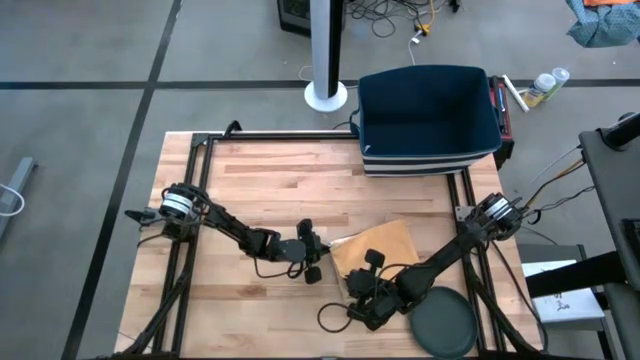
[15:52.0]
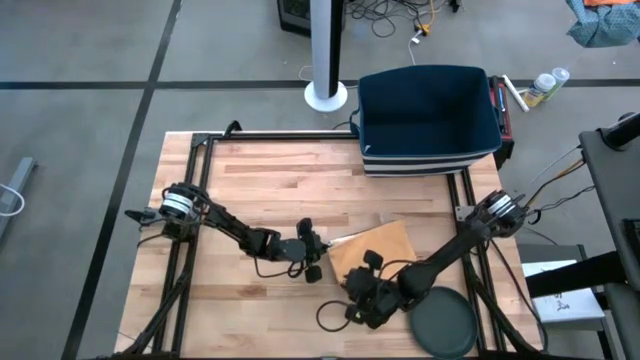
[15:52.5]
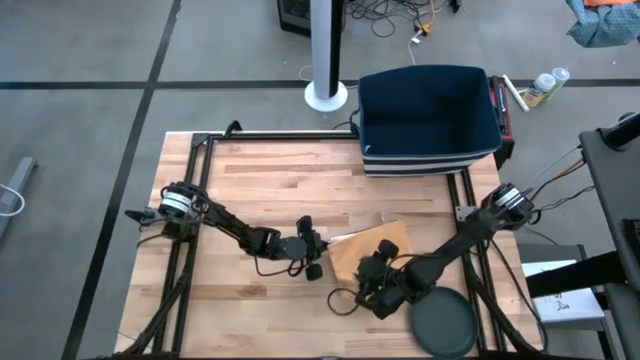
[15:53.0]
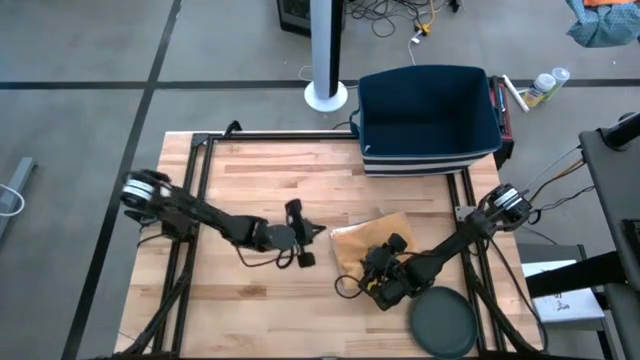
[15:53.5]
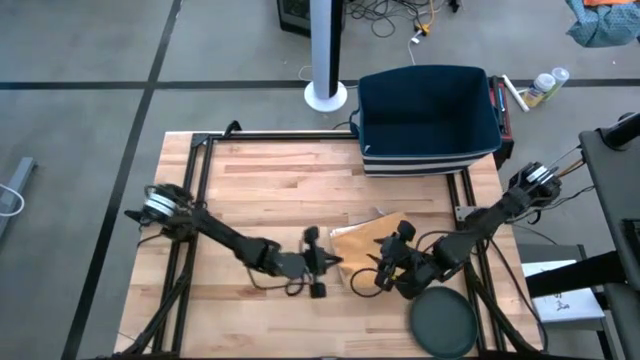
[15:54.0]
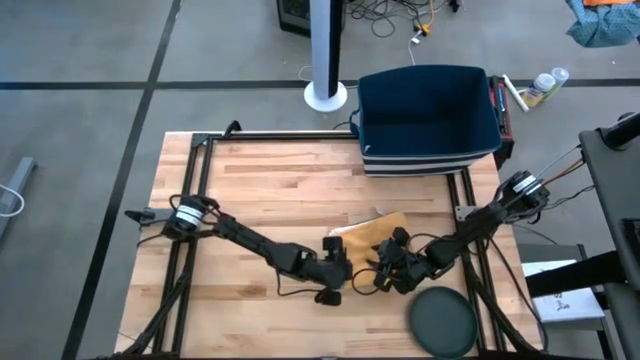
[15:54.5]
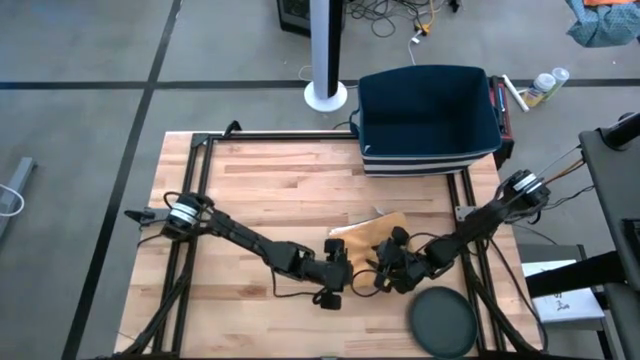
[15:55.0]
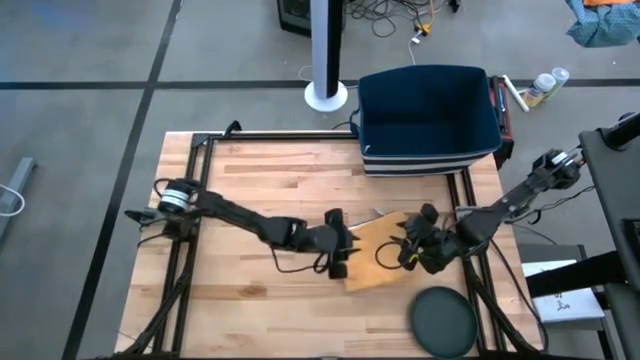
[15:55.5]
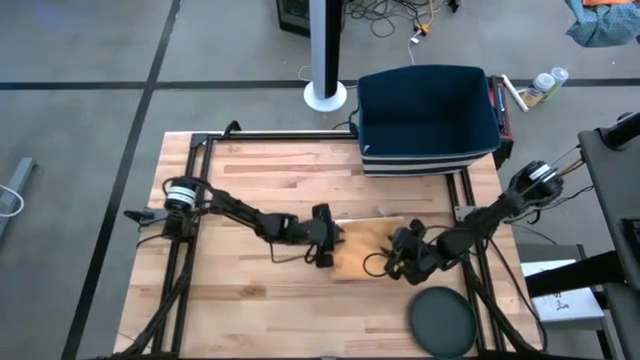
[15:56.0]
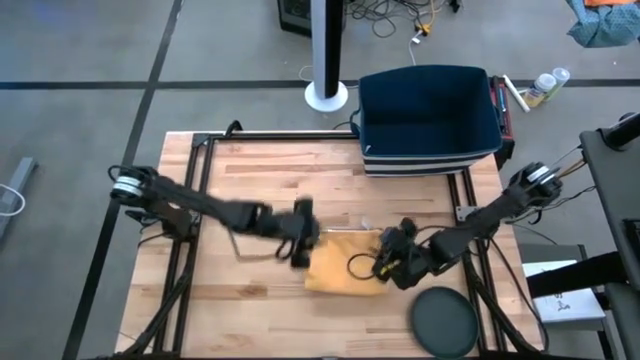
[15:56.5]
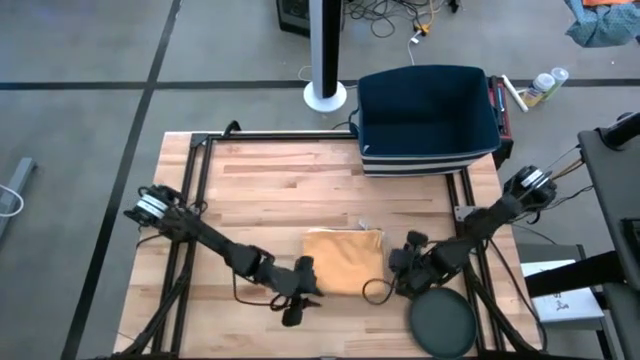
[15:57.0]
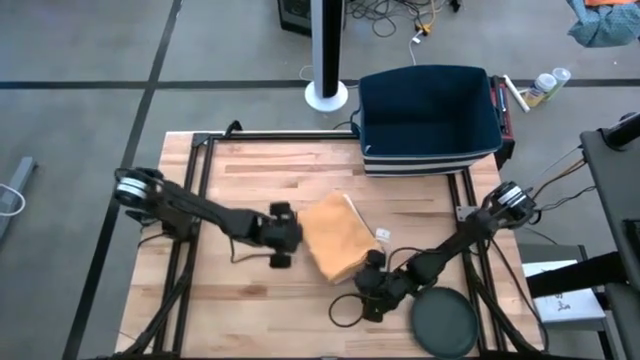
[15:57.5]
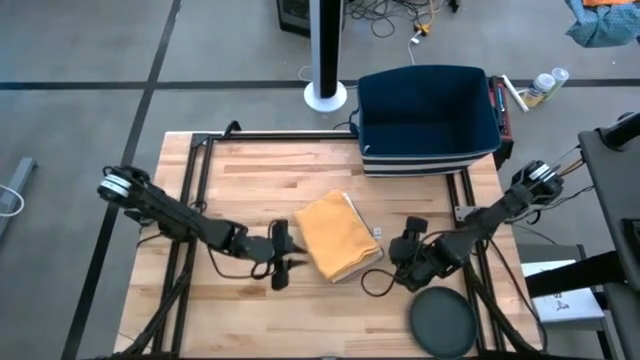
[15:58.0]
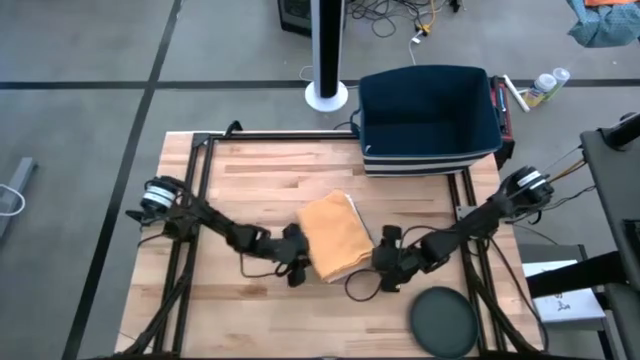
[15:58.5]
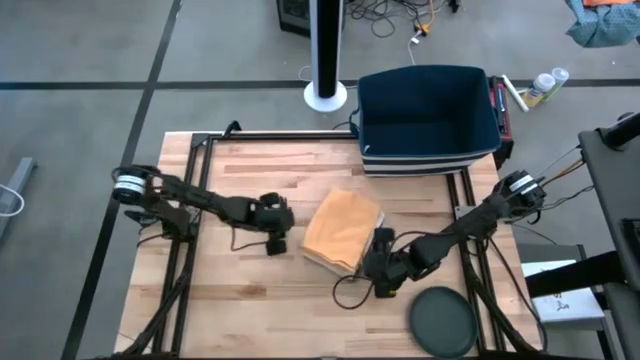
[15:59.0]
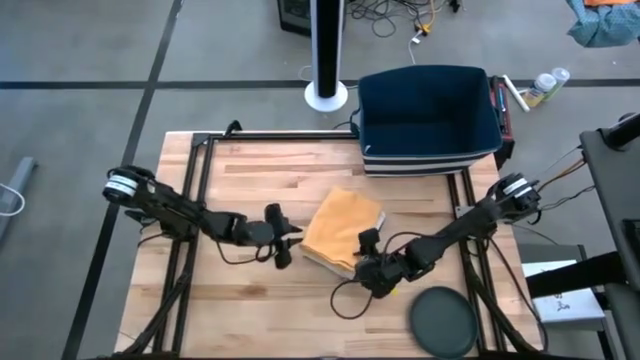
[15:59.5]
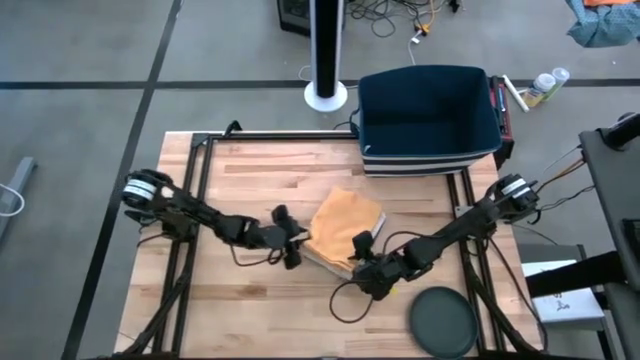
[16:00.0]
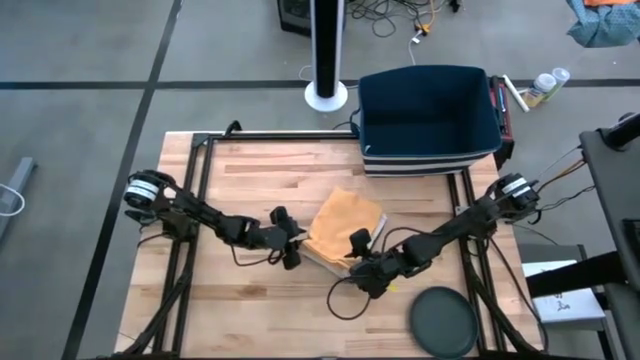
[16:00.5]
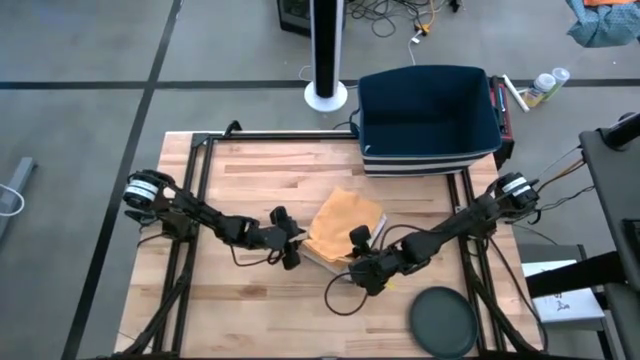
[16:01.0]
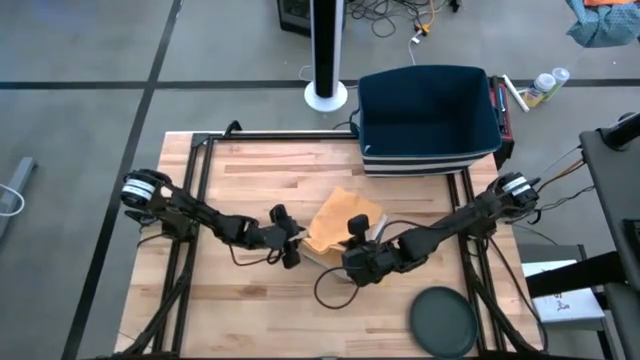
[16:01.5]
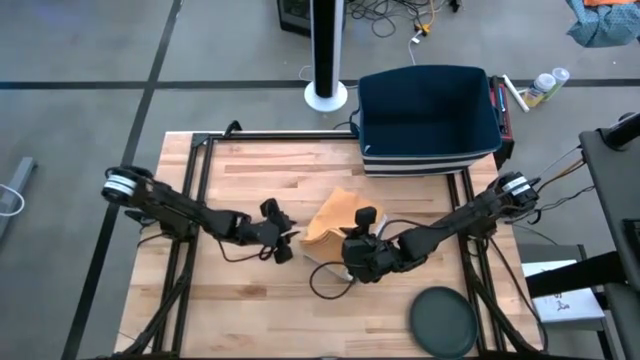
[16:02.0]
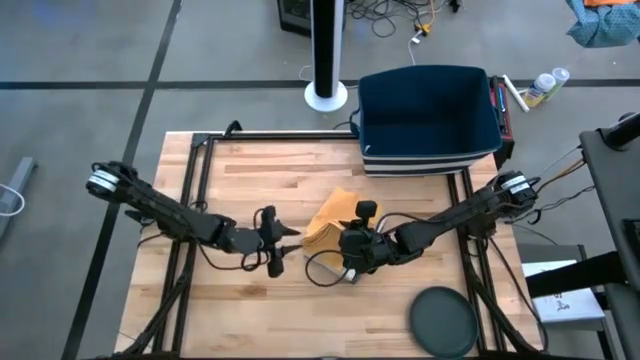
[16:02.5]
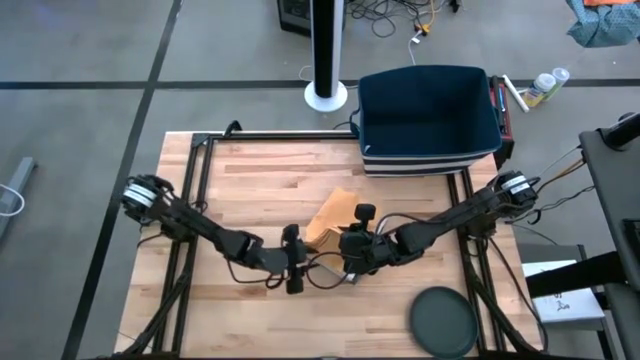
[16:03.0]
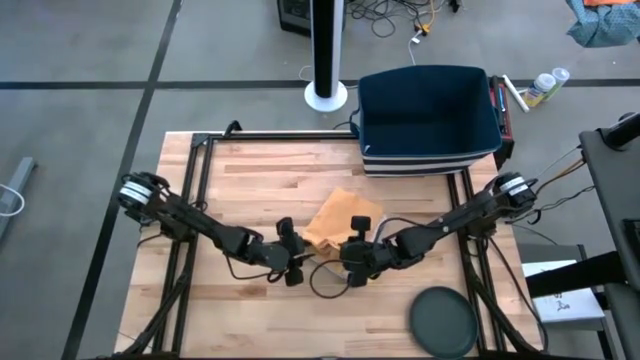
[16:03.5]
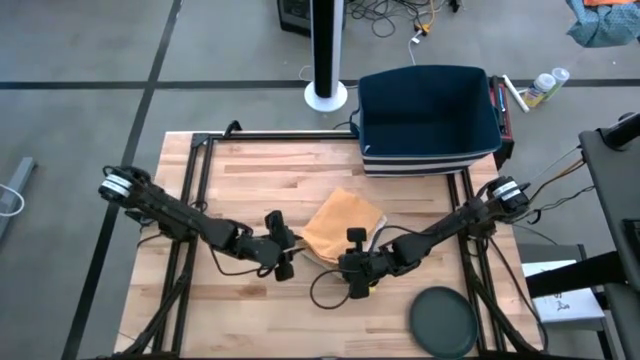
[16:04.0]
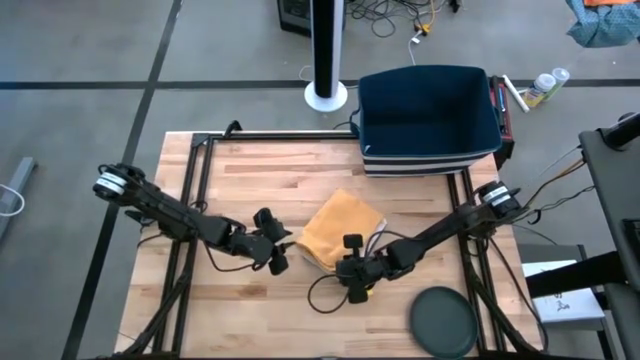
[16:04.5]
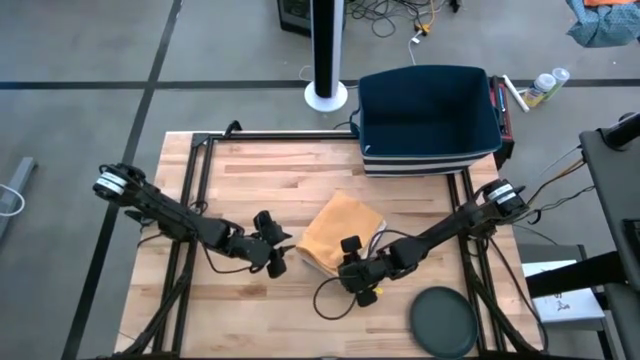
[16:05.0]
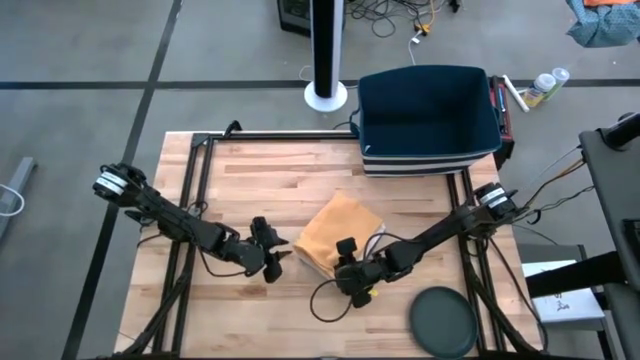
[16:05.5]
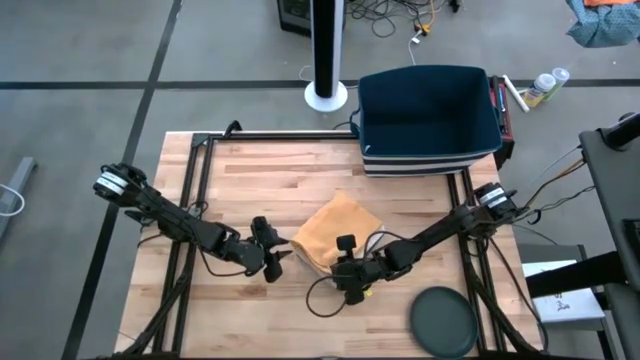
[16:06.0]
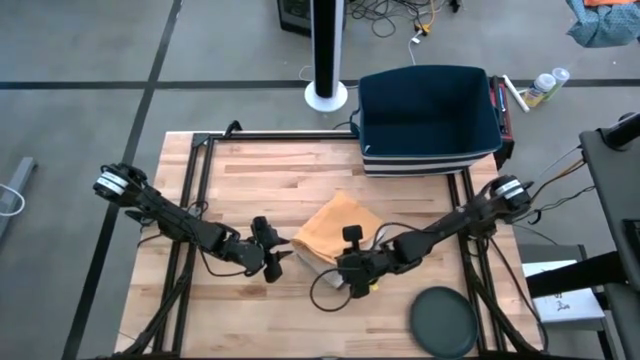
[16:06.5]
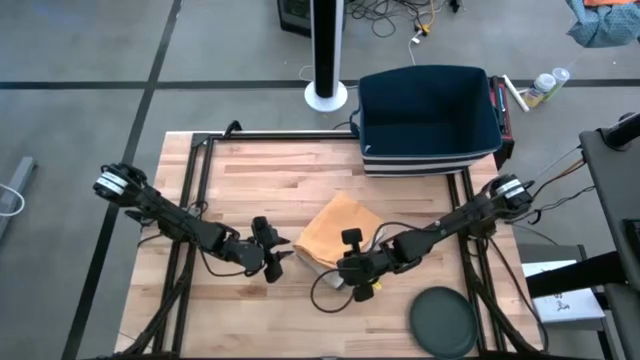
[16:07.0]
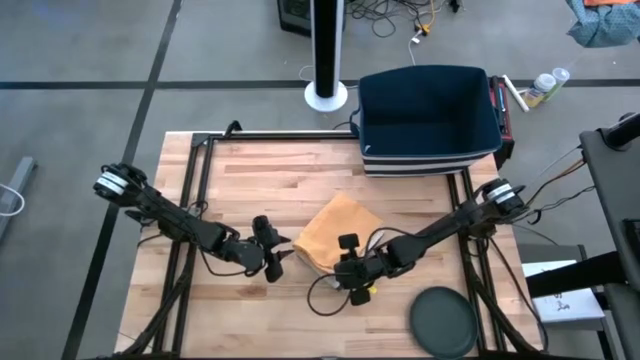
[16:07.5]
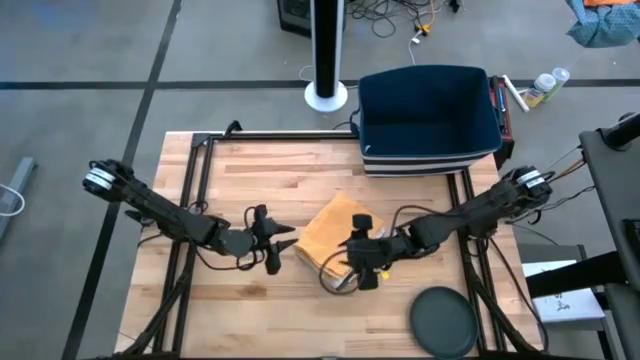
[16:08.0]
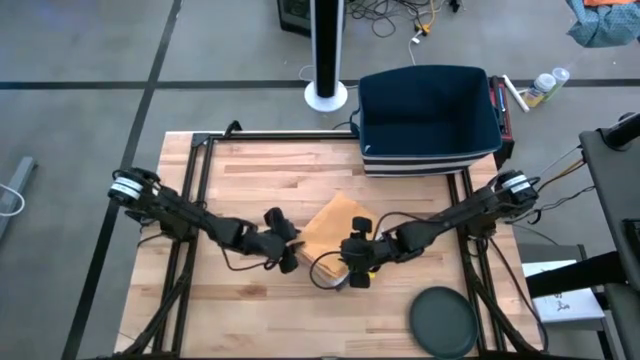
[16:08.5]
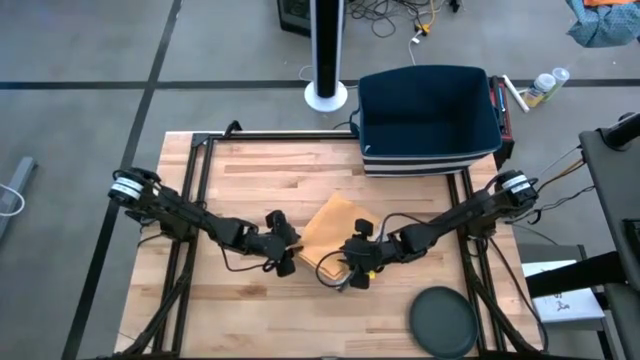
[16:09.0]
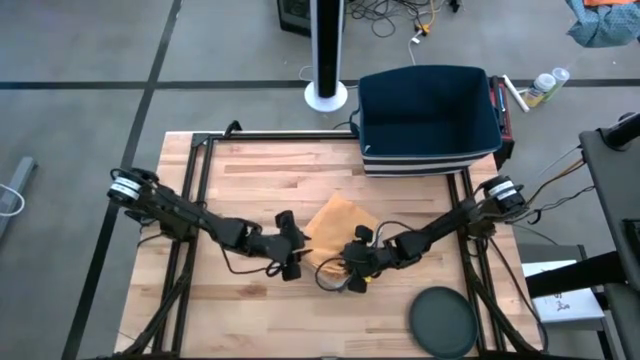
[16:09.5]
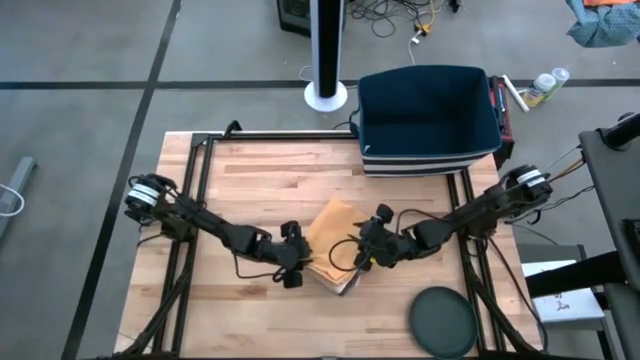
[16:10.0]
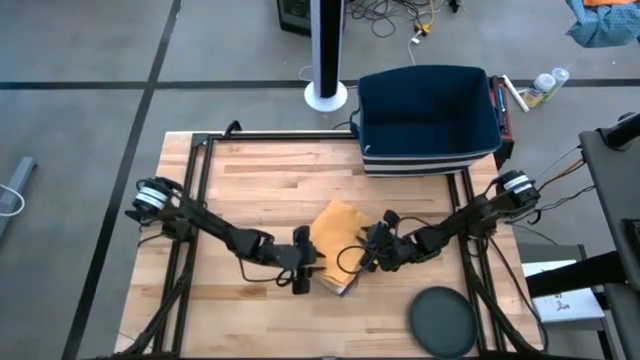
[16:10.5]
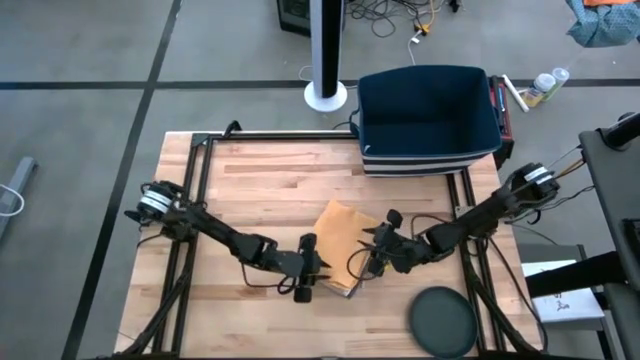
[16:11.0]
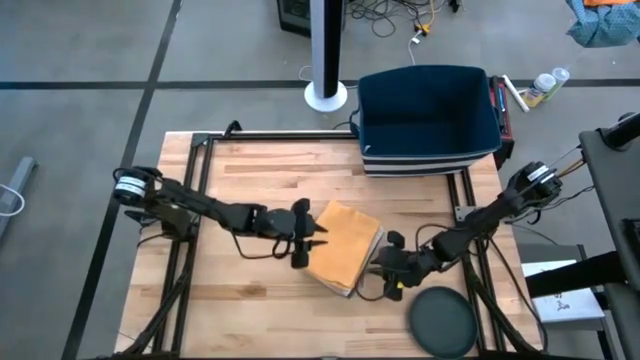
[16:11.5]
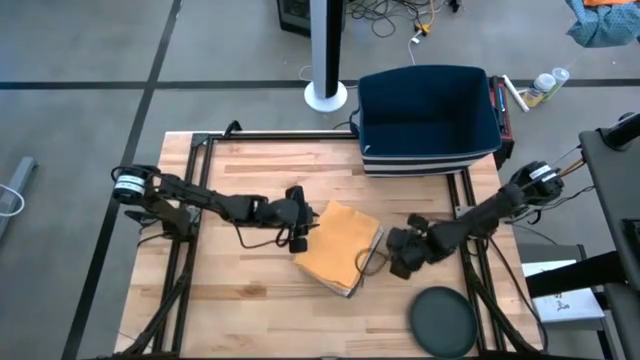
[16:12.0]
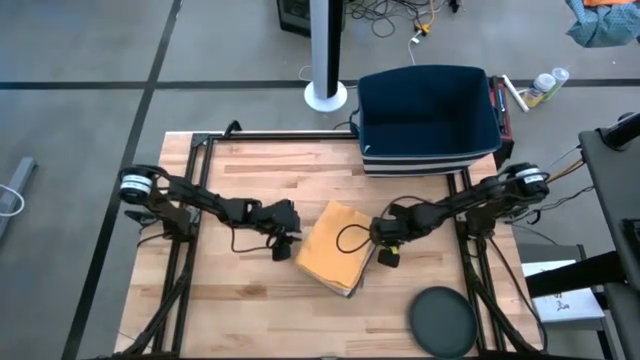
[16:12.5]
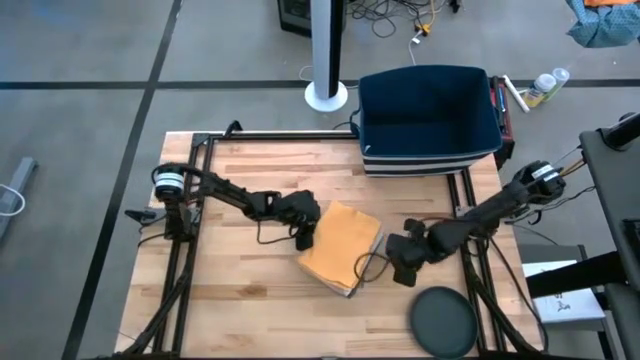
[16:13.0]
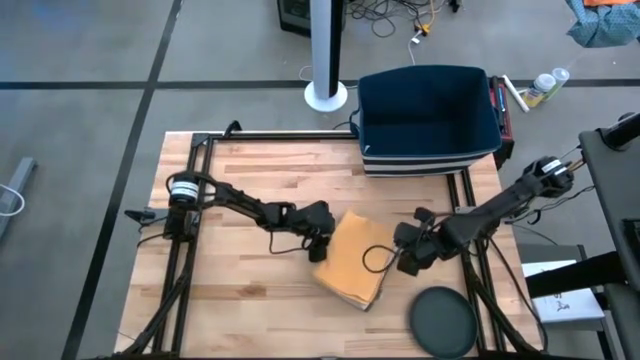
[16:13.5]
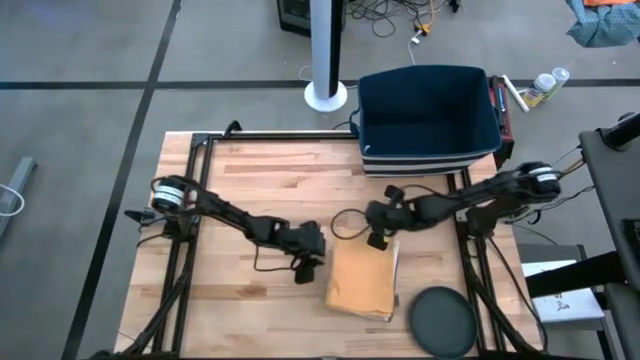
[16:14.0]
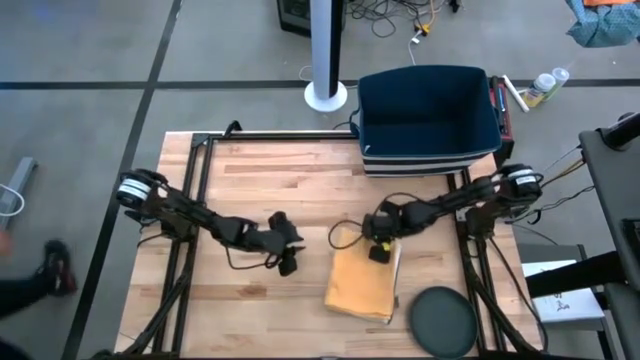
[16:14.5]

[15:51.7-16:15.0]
Task: Fold kitchen towel into neat rectangle
Stack the orange towel on top of the white patterned towel
